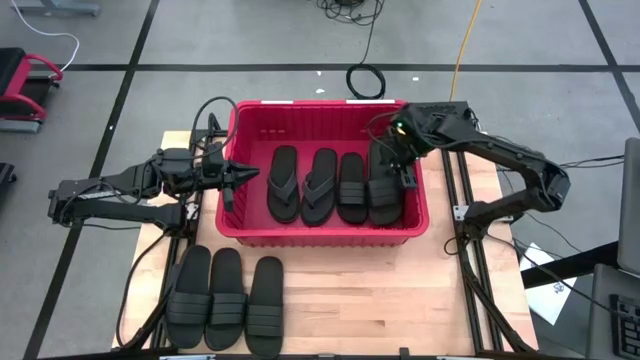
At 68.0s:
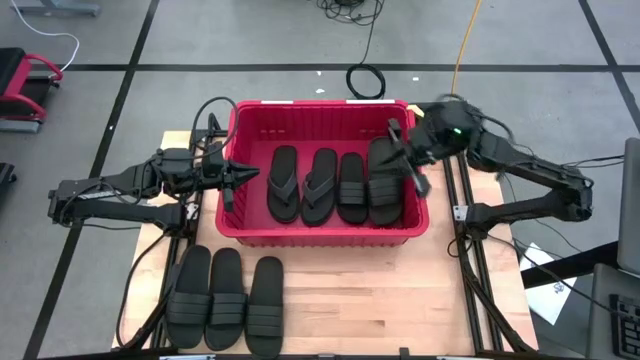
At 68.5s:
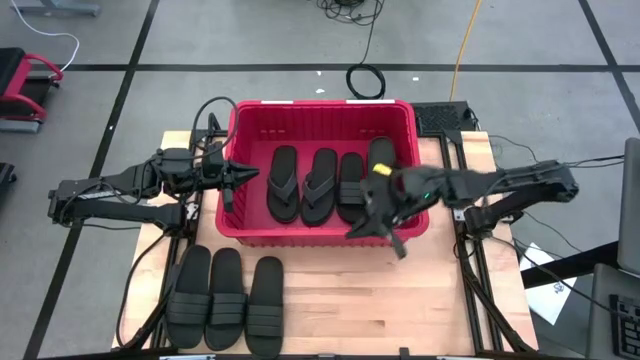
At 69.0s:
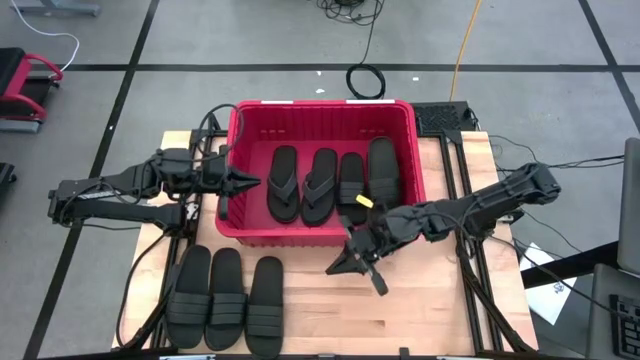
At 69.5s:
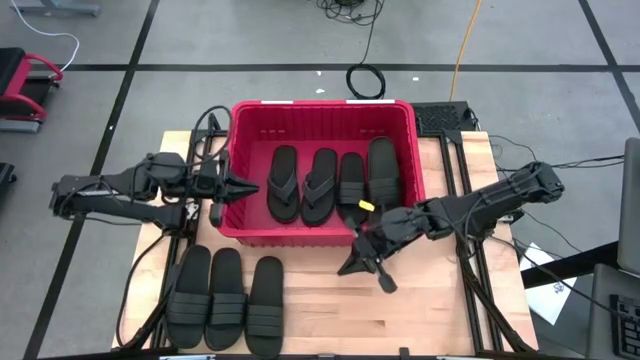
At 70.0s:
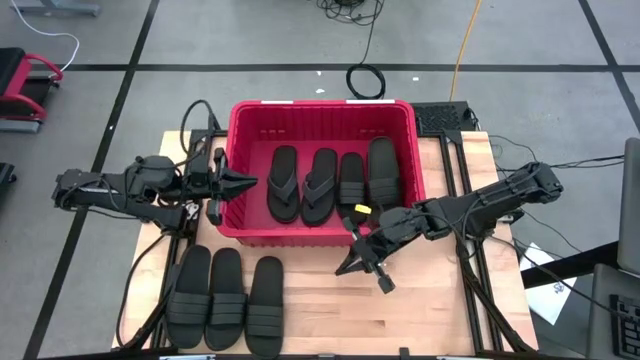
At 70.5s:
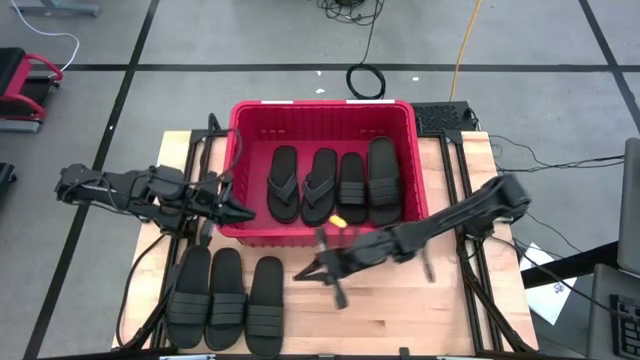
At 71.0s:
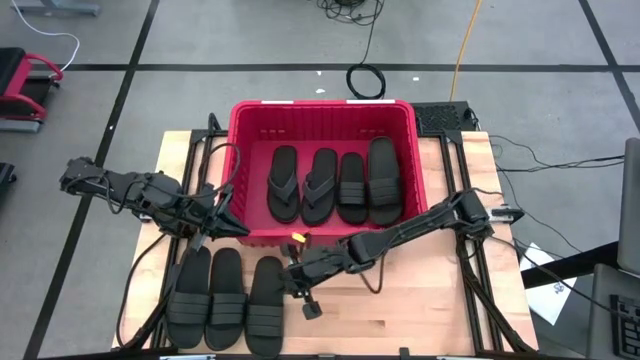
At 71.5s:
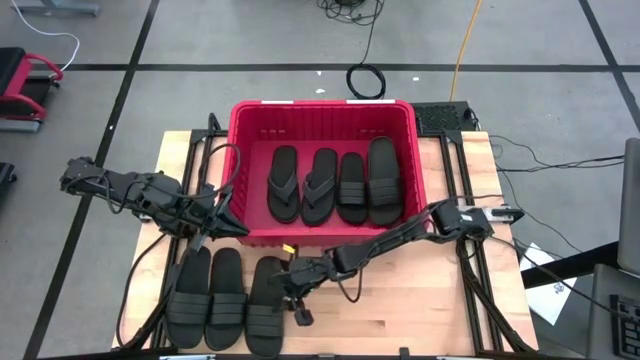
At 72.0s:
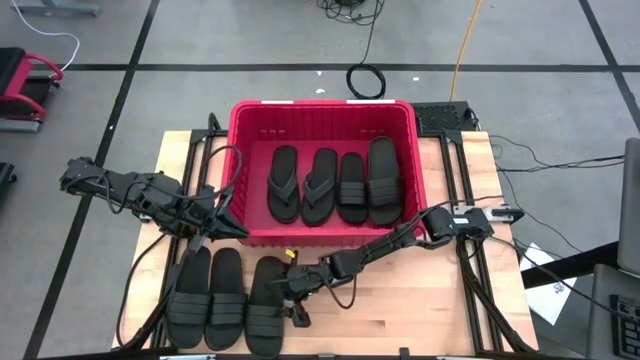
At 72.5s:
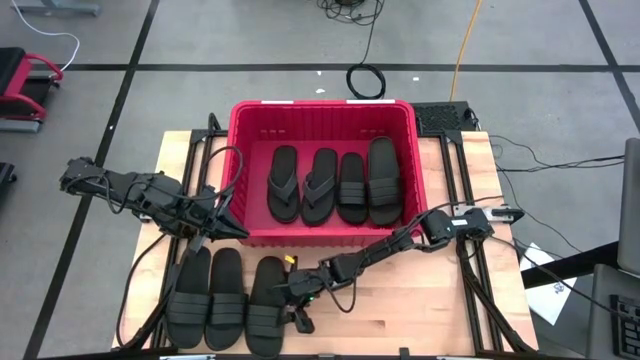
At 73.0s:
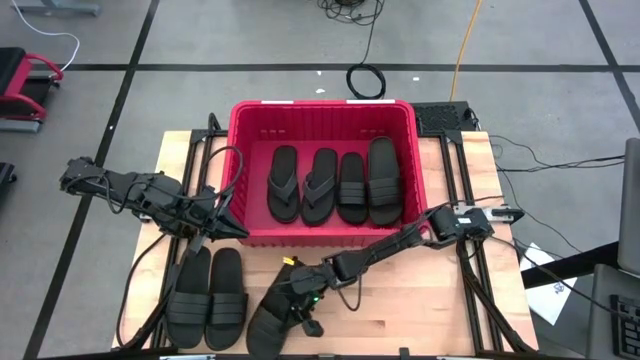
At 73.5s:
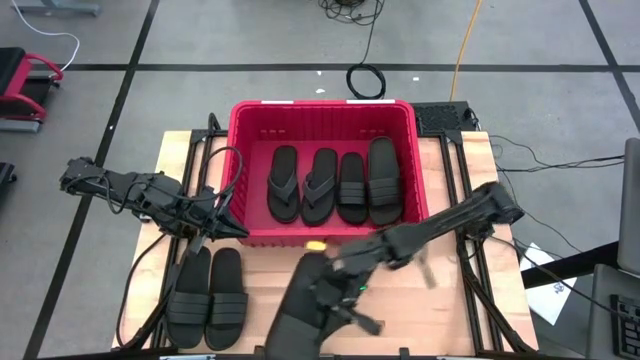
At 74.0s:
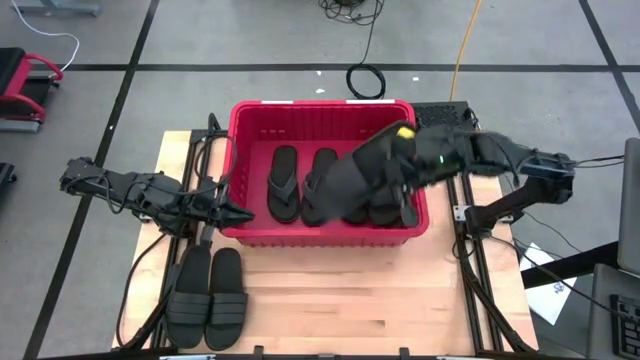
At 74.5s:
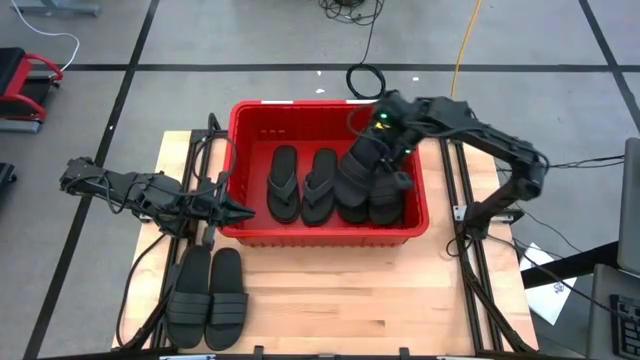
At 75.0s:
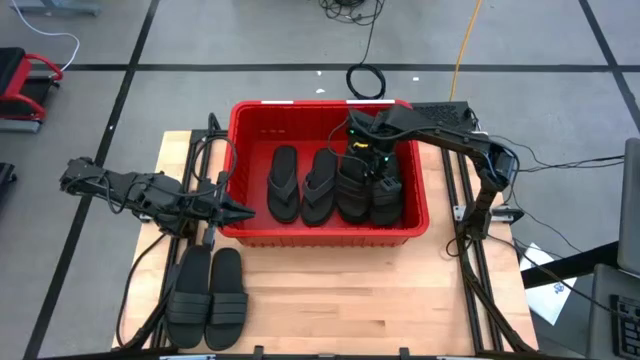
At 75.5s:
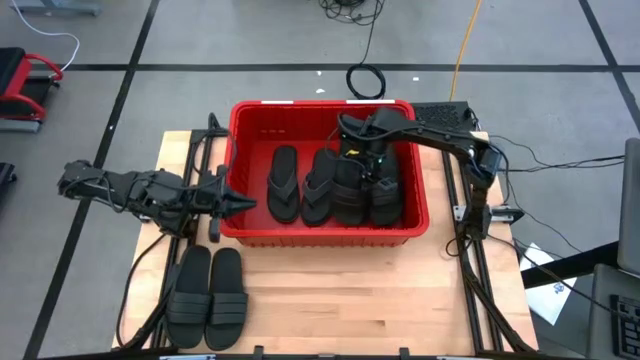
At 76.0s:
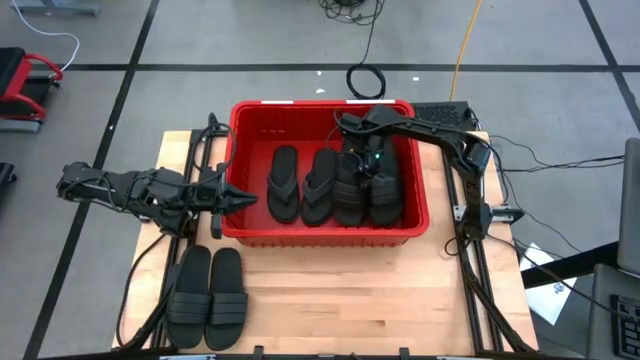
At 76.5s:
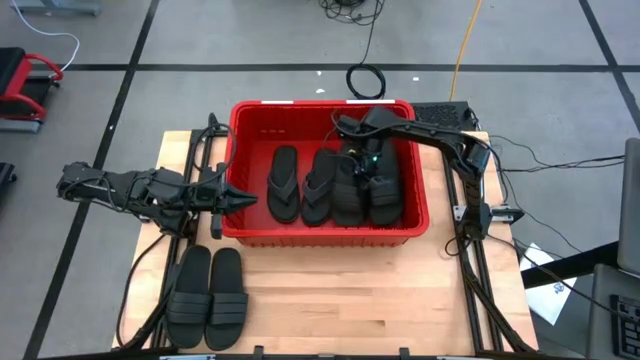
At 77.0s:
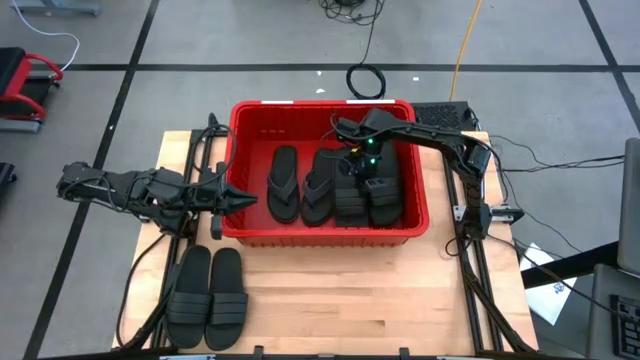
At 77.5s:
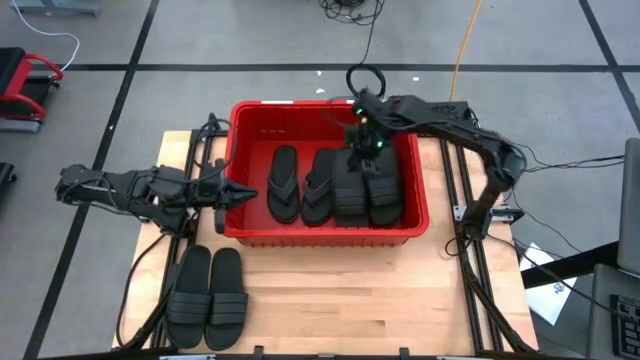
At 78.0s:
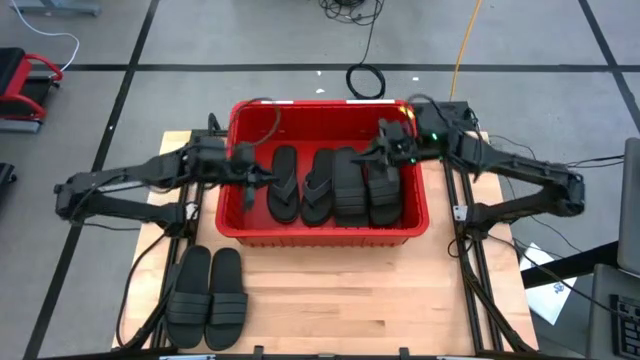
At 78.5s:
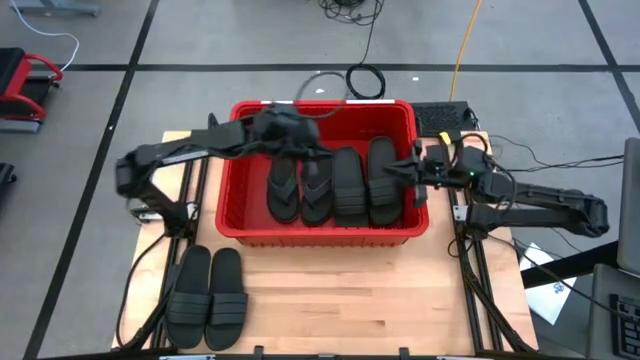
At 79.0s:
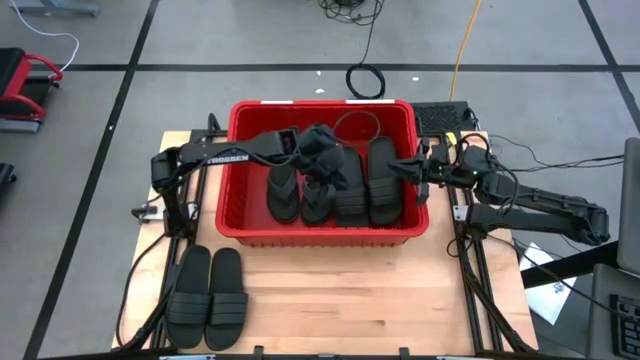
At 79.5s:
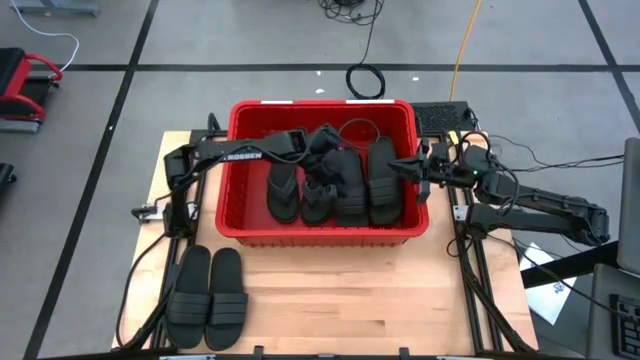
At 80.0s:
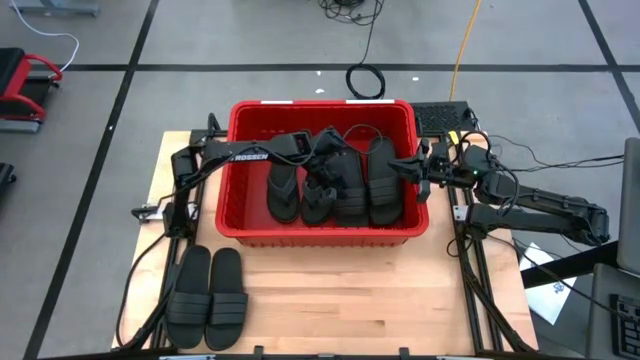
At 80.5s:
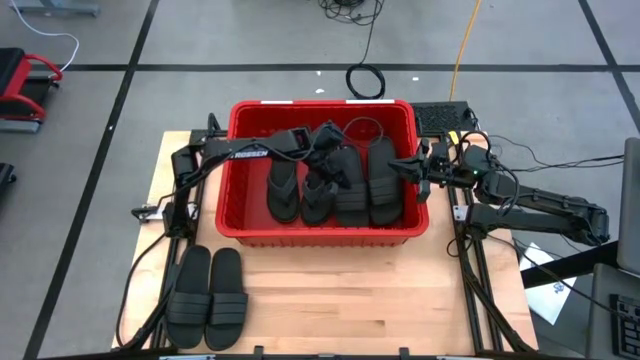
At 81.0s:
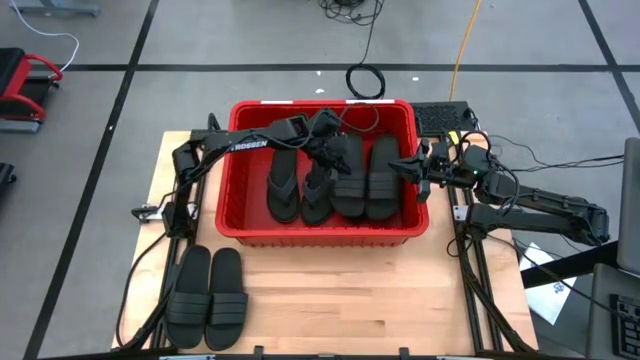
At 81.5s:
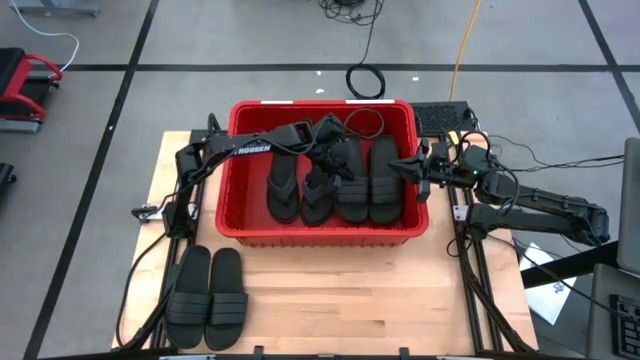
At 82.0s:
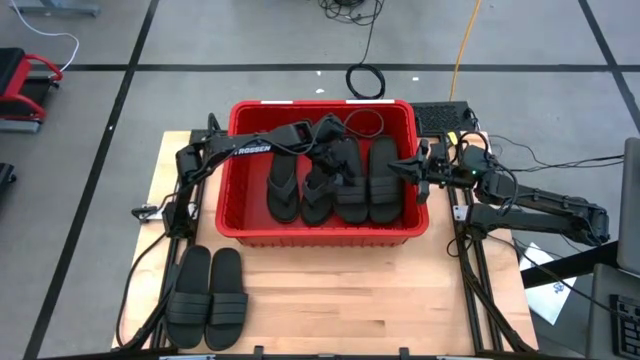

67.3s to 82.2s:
Task: Pick and place slides into bin
Put the right slide into the bin

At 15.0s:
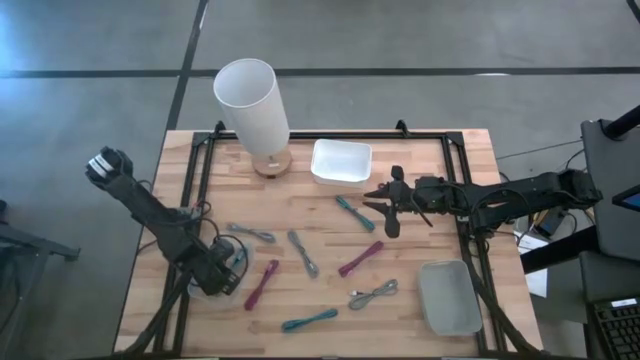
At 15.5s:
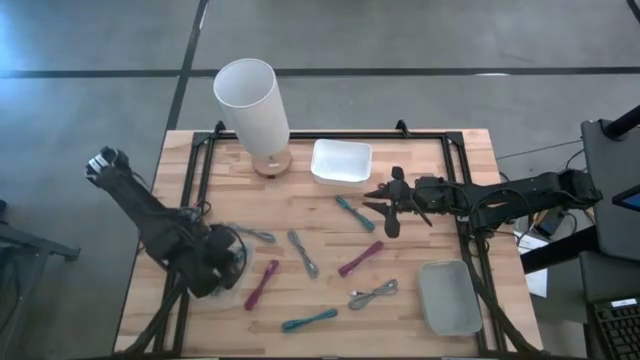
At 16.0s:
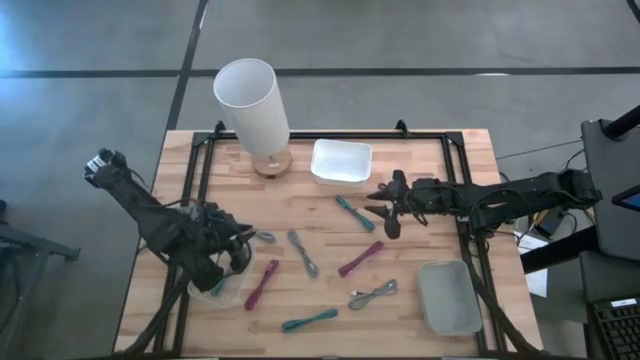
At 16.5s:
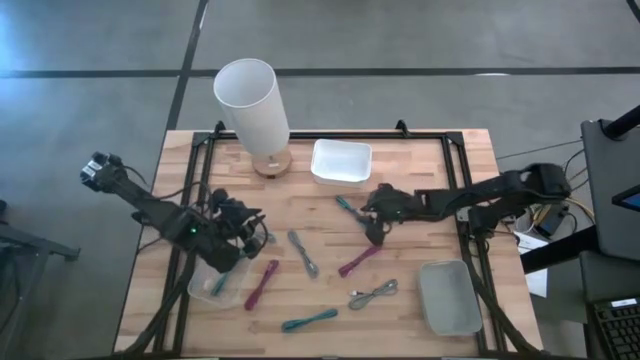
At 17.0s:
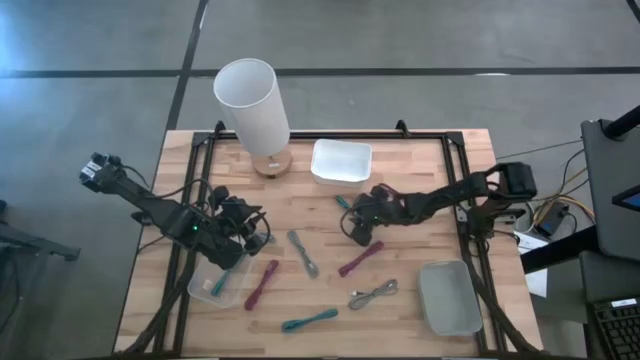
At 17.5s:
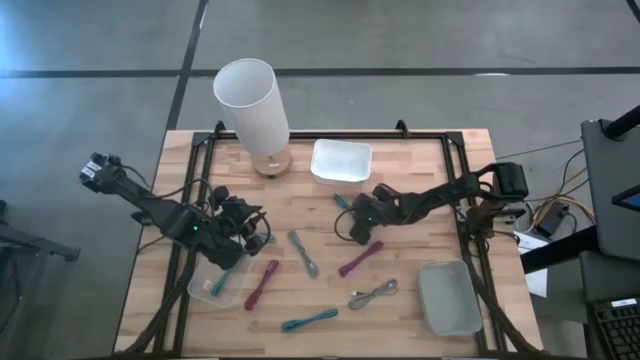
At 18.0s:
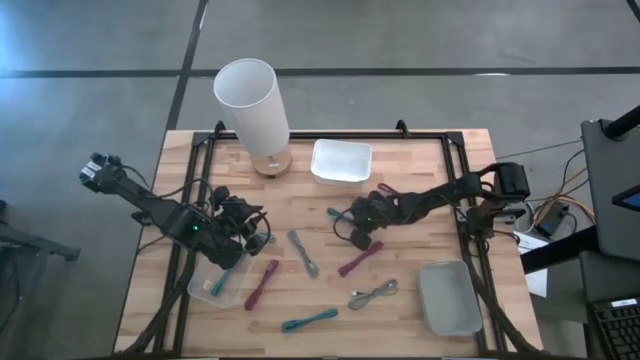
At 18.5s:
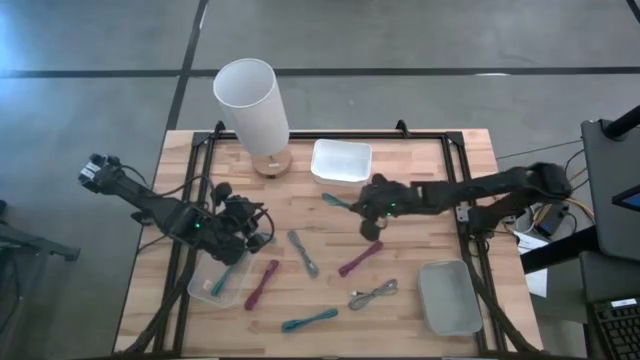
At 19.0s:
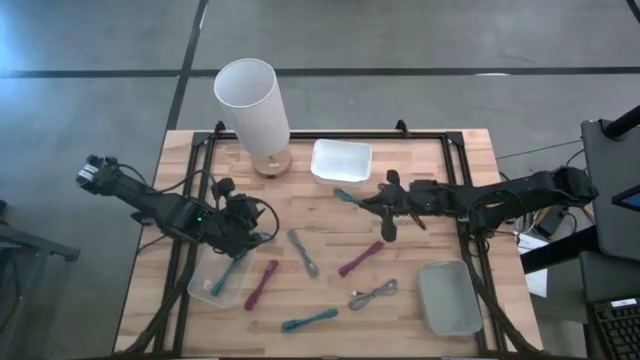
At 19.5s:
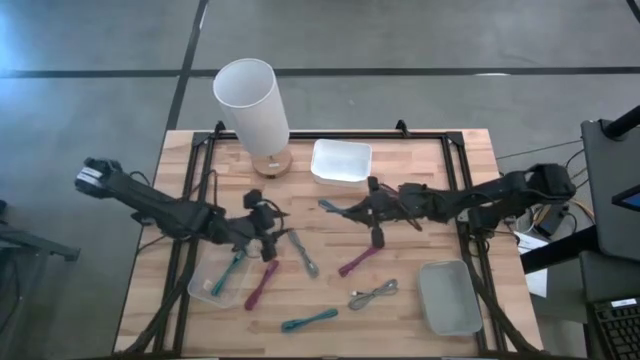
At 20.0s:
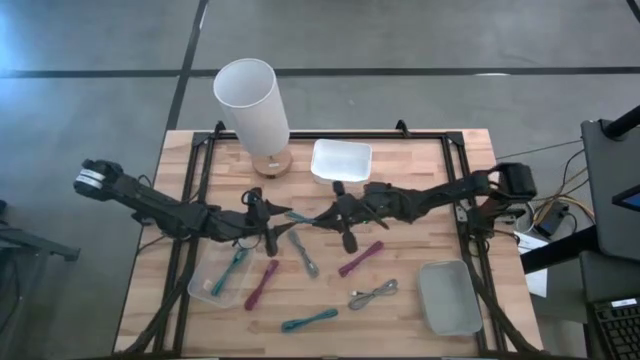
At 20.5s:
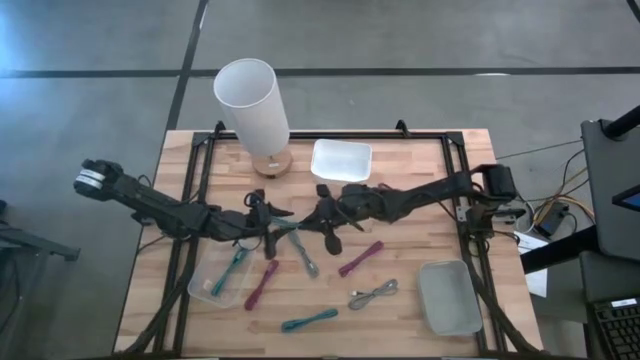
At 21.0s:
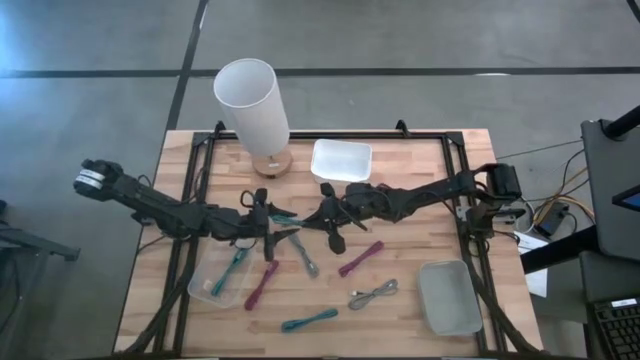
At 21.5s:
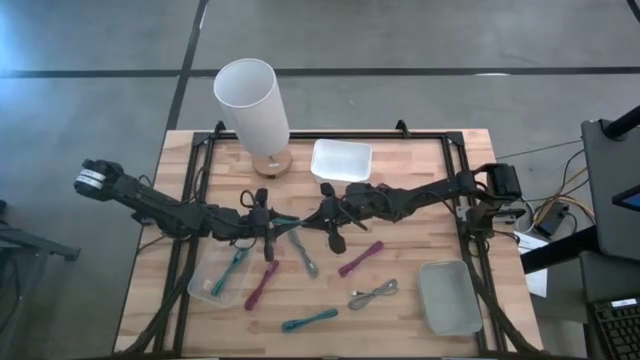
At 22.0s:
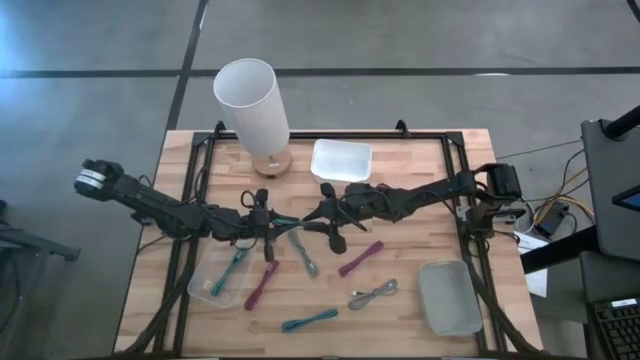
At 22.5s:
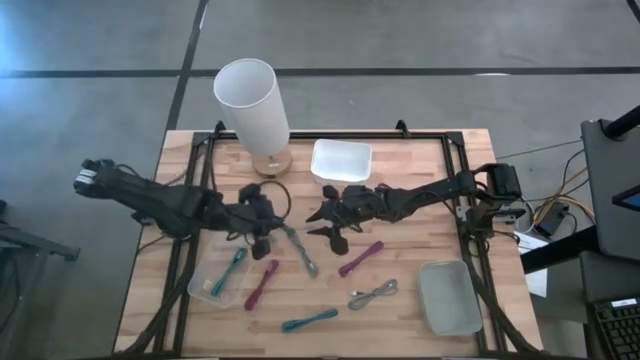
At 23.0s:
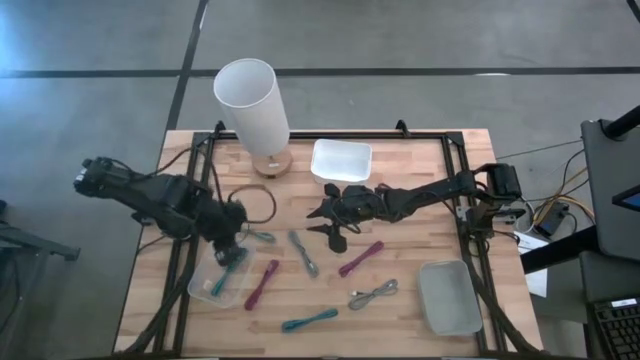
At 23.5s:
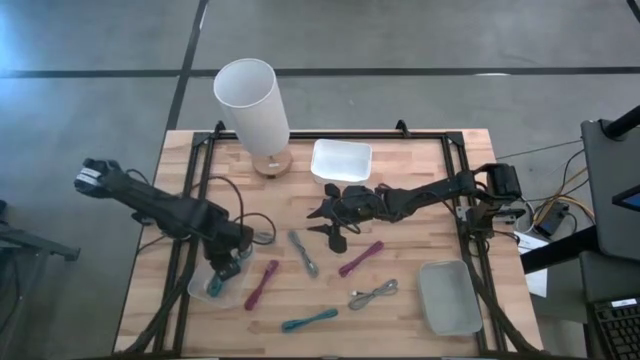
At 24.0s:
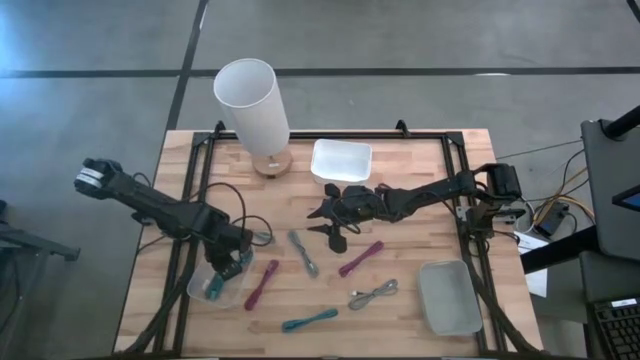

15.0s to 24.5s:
Task: Pick & Place USB Port
Put the top blue black charger cable into the transparent bin
